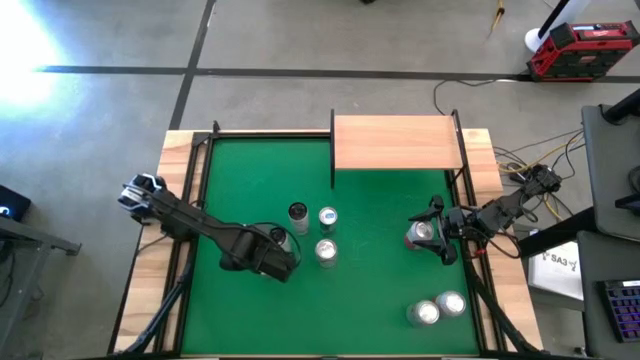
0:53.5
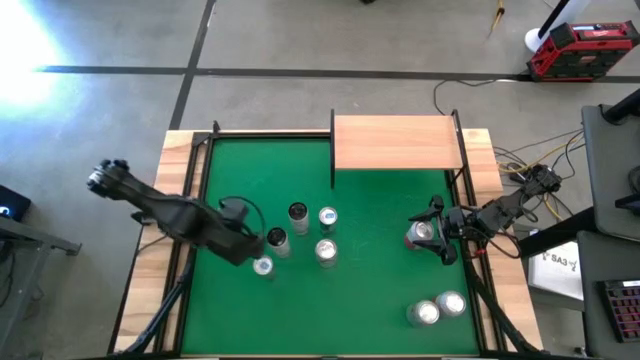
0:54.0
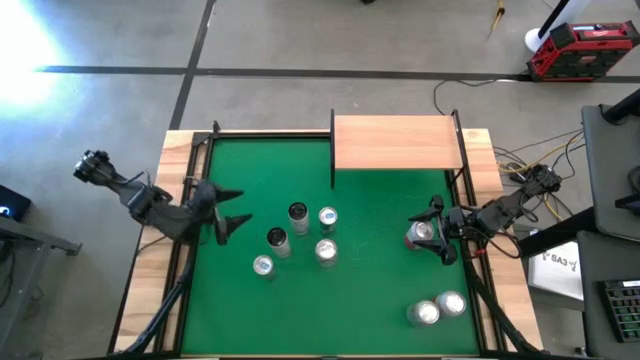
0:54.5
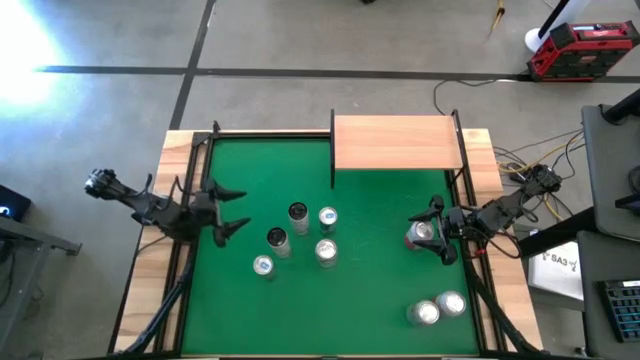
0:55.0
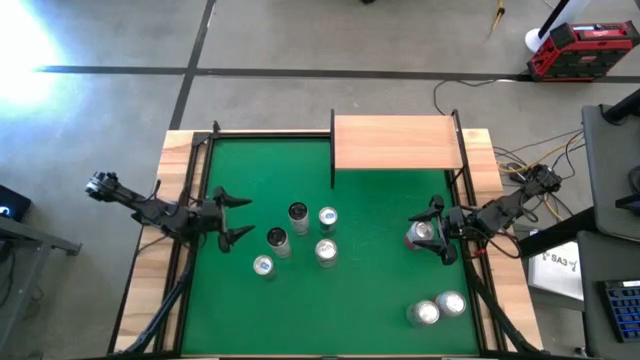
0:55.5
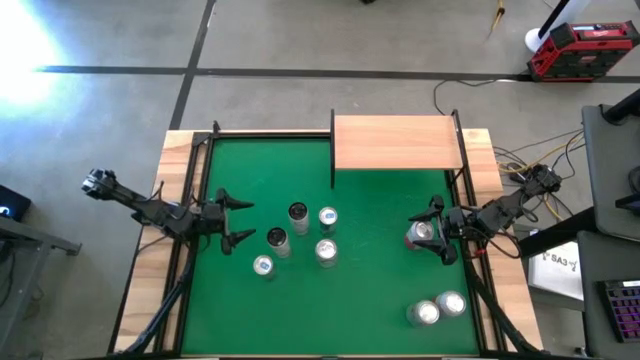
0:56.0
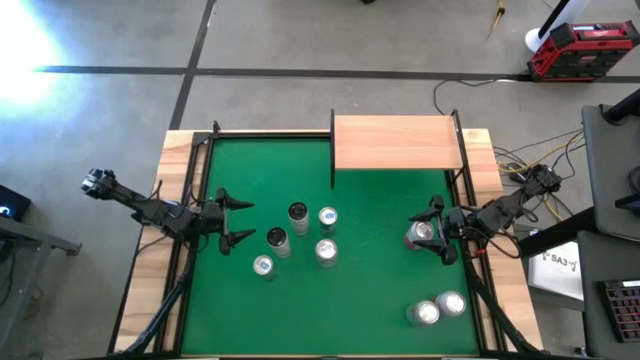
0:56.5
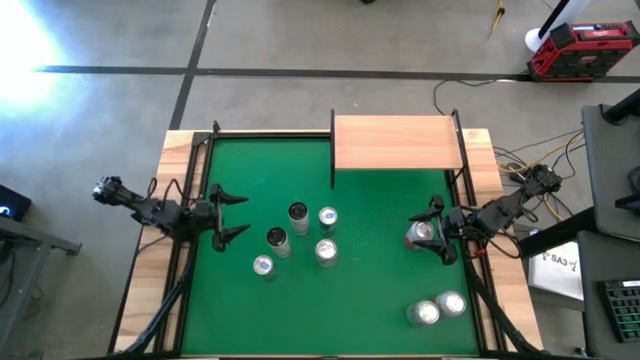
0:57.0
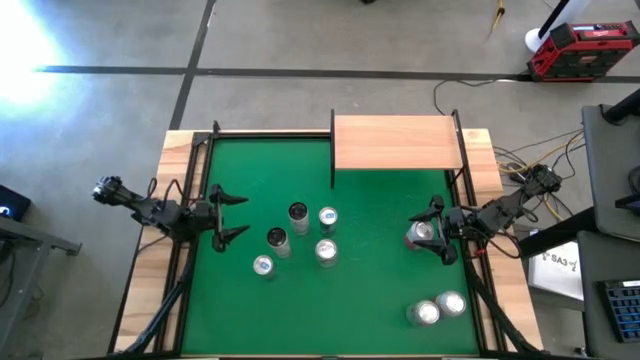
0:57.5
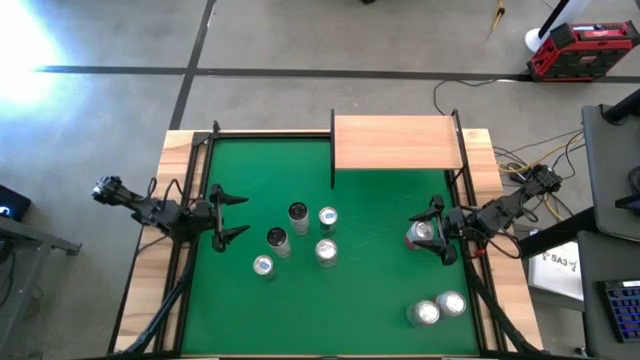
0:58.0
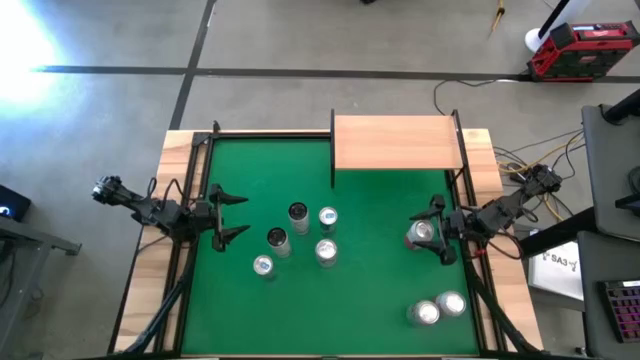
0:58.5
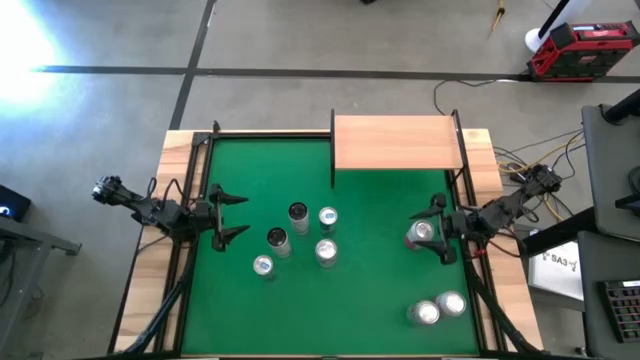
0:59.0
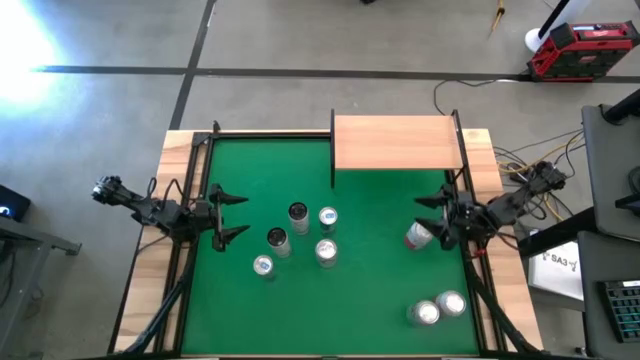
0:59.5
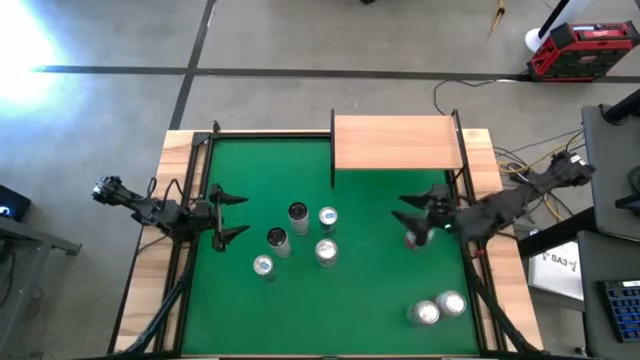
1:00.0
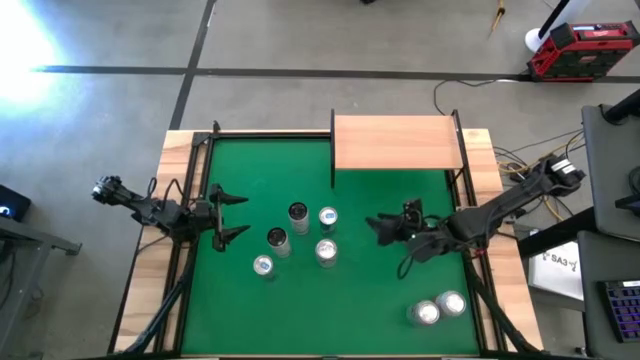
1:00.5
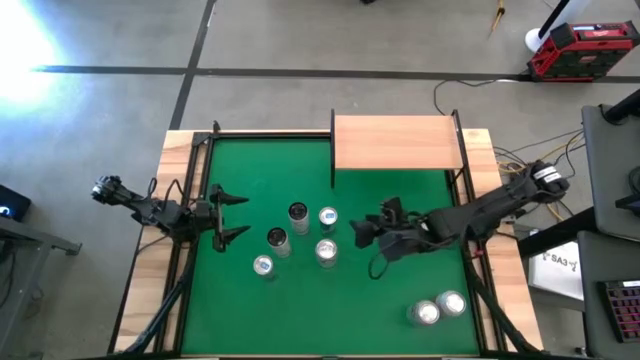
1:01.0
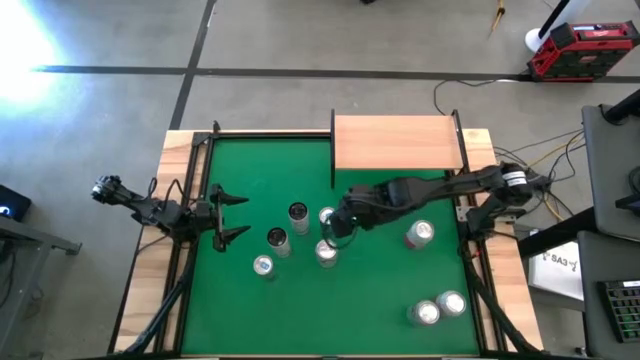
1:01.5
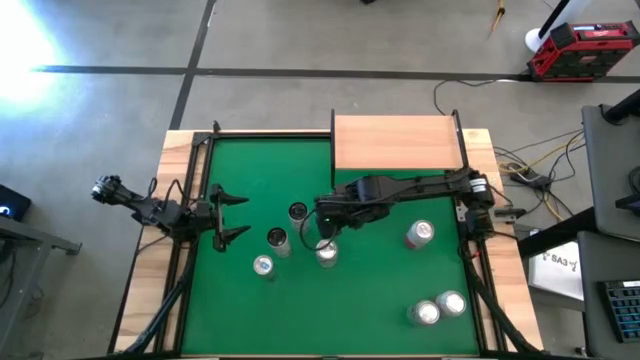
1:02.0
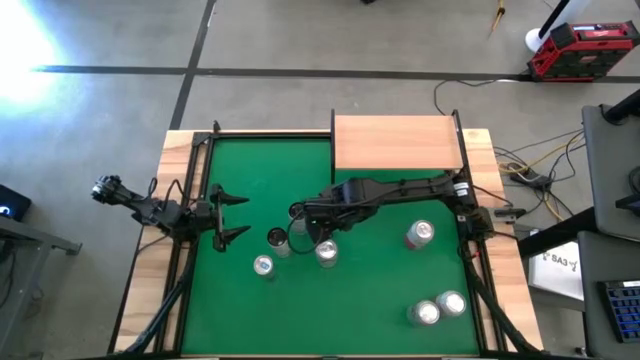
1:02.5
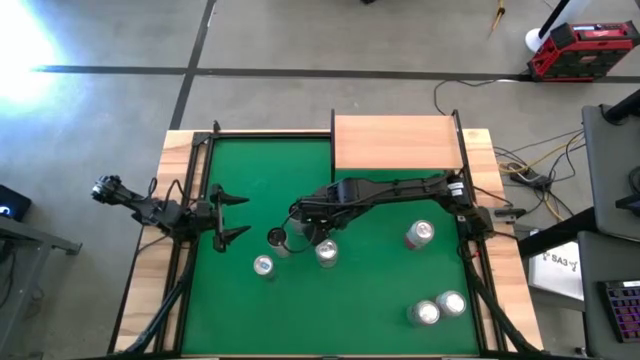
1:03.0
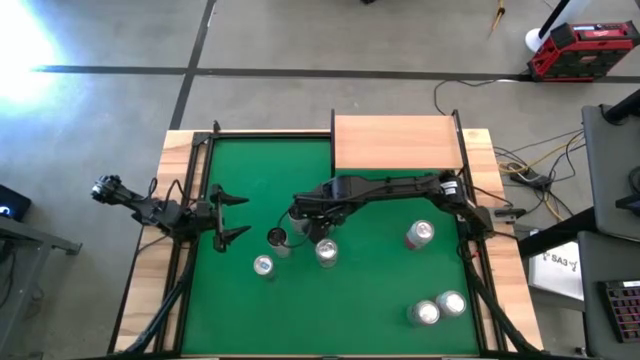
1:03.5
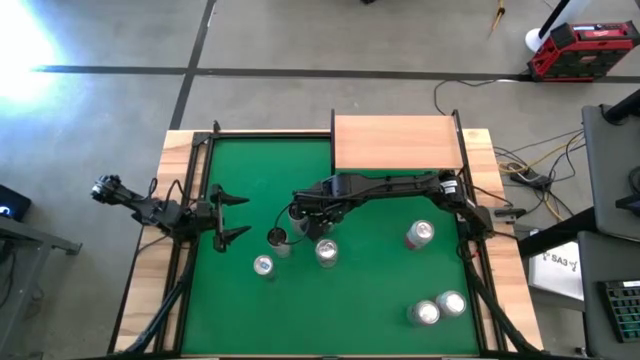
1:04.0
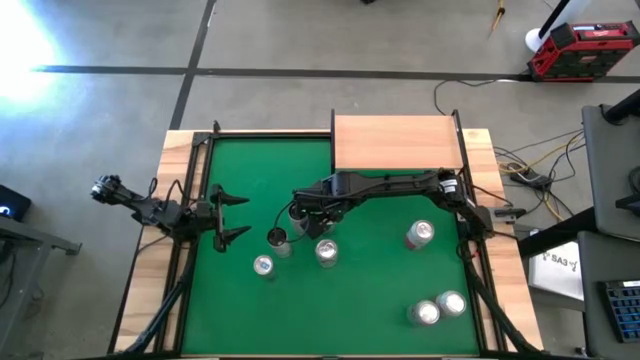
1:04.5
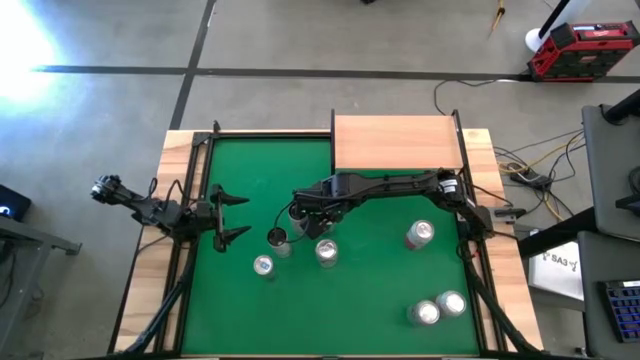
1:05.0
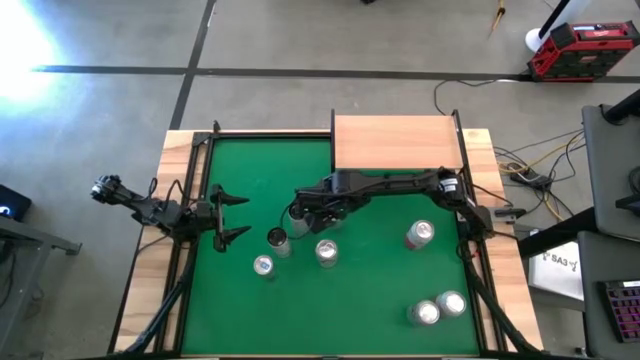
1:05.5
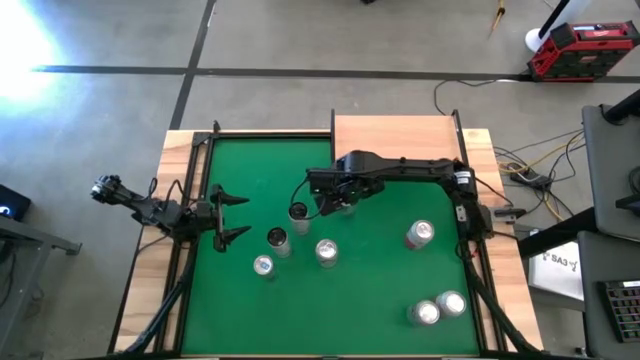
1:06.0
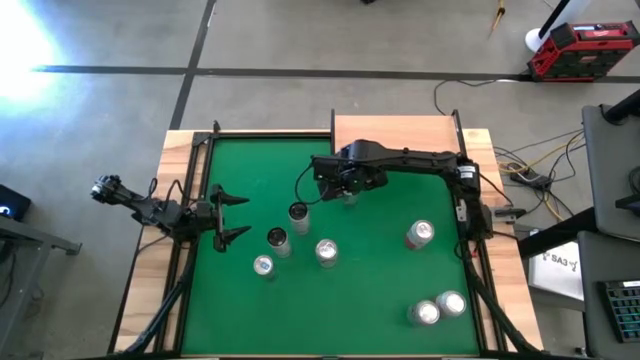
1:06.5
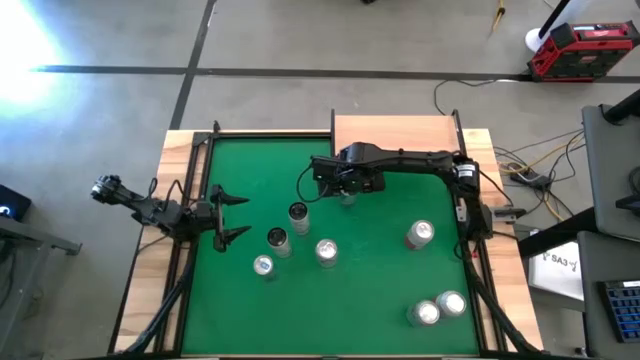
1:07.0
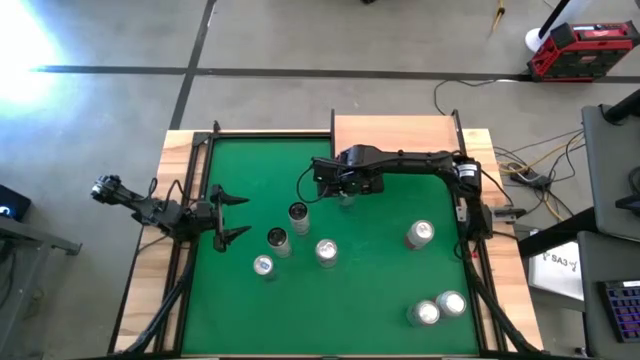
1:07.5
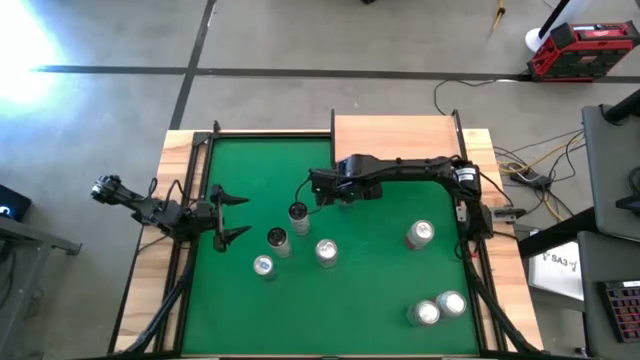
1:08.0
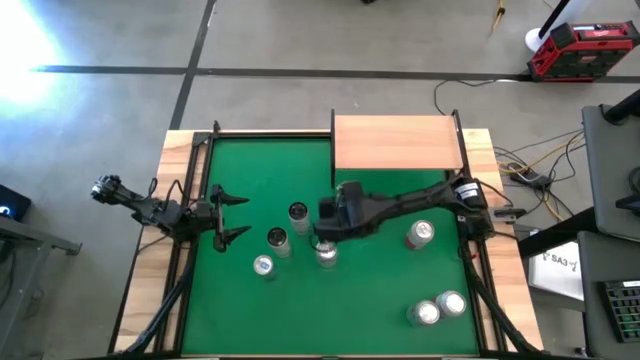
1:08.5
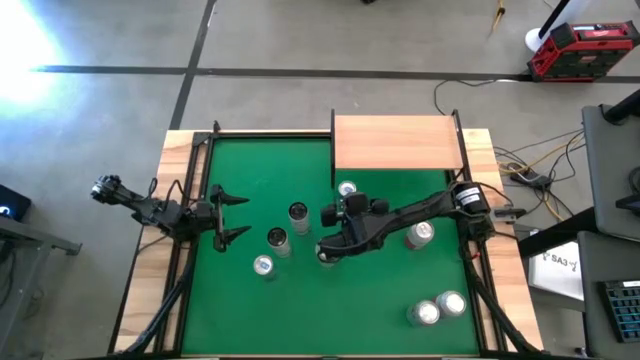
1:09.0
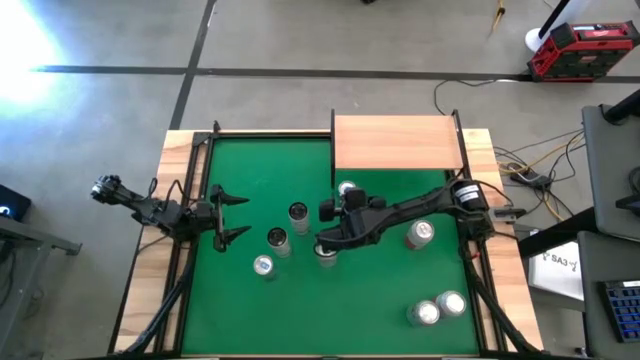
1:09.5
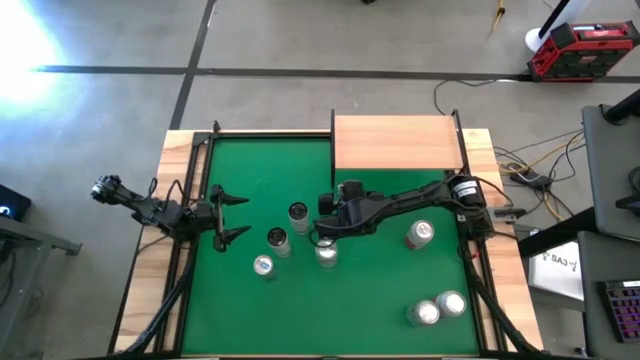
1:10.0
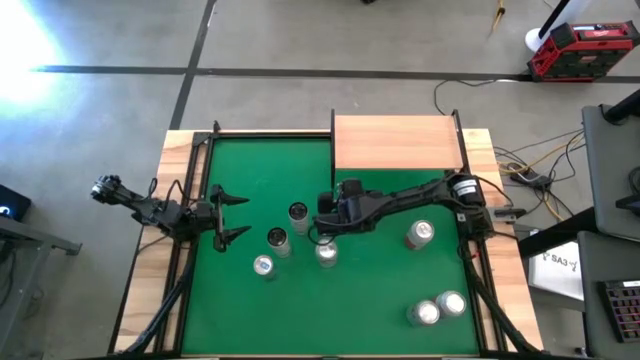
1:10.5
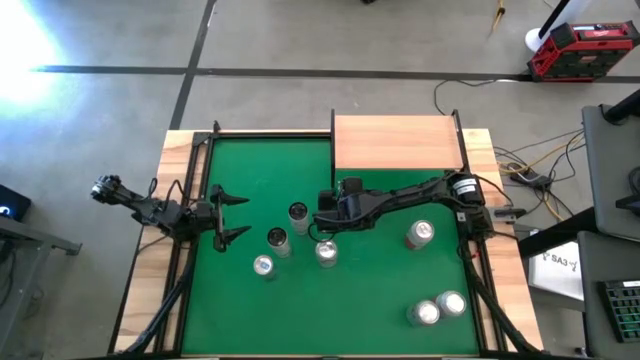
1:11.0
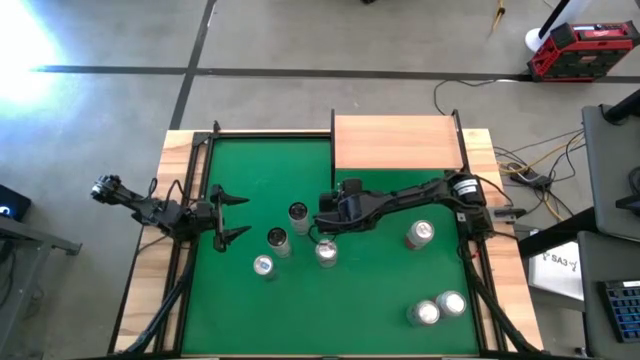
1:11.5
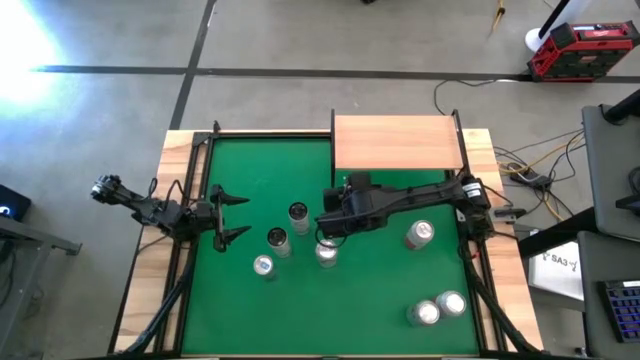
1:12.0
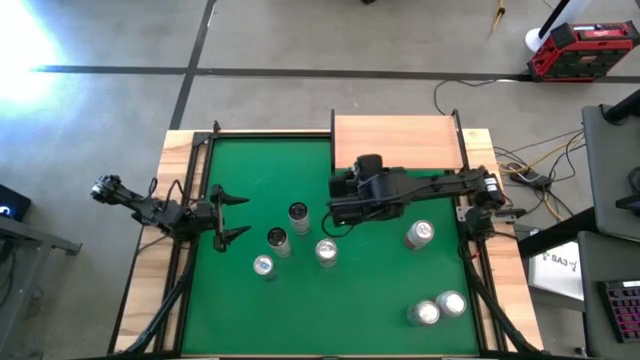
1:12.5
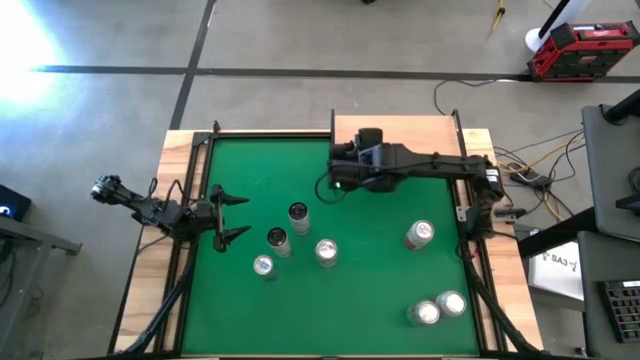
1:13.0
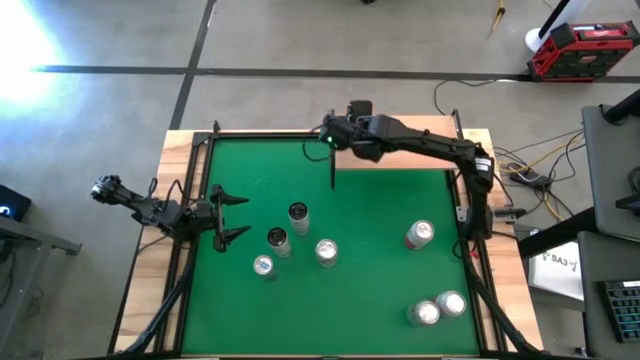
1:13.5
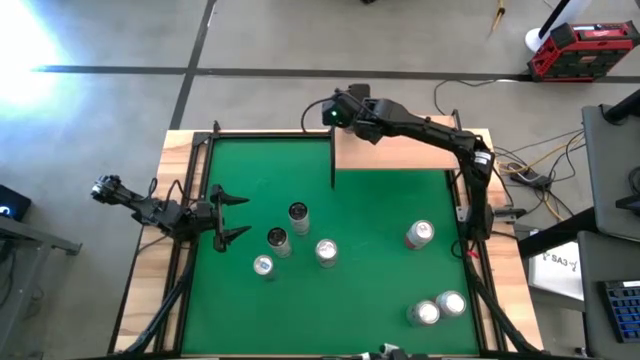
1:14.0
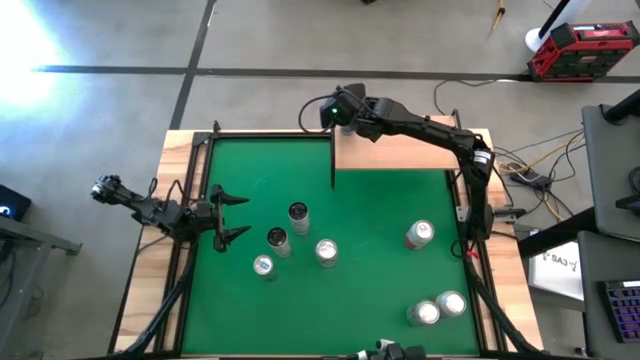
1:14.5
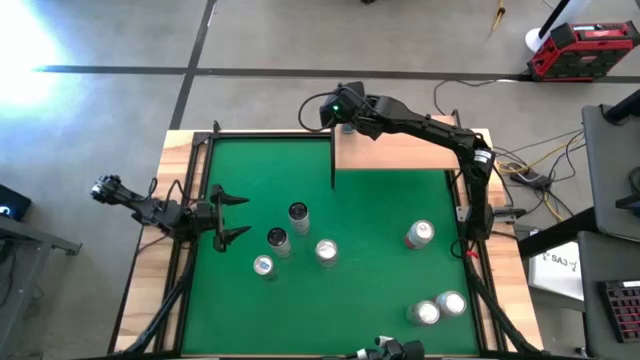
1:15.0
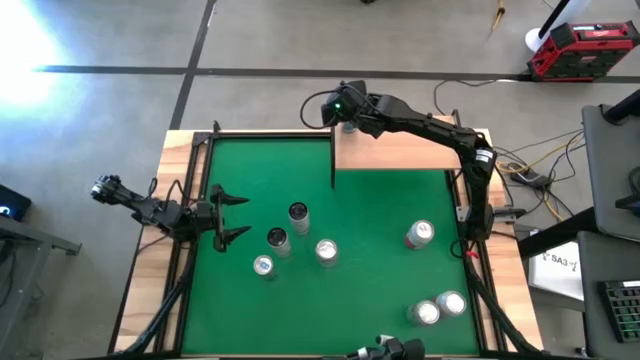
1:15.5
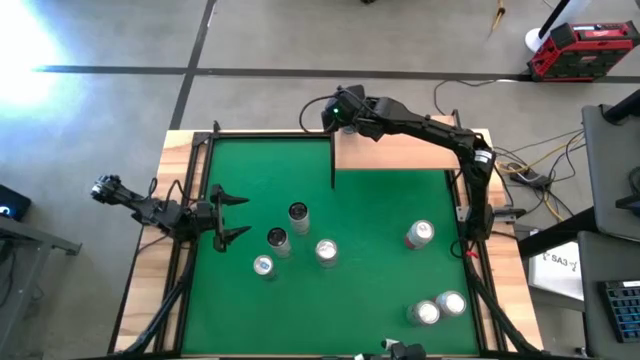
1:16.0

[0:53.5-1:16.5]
Task: Place canned beverage on shelf
Put the top blue soda can on the shelf
